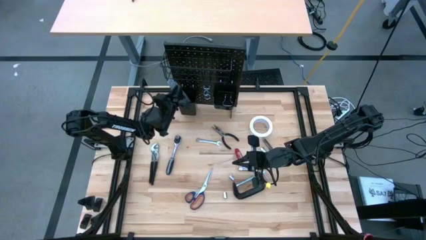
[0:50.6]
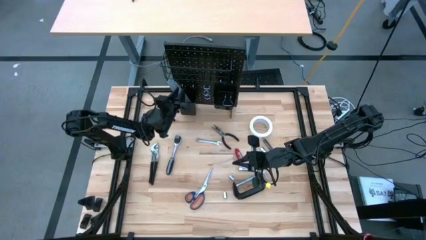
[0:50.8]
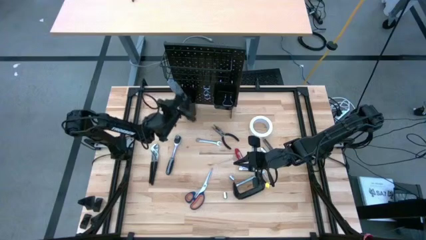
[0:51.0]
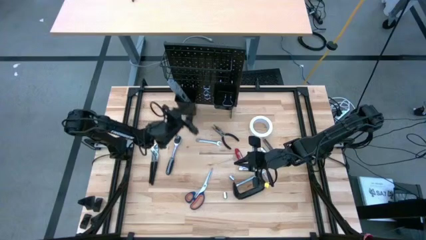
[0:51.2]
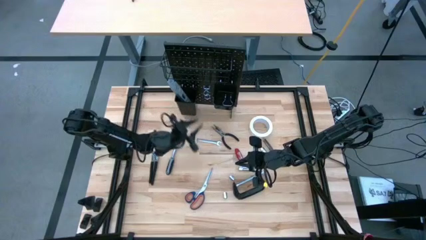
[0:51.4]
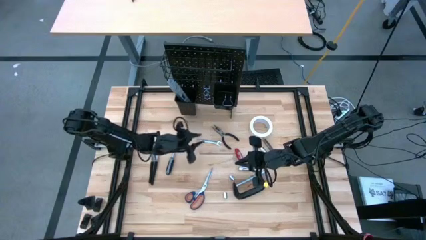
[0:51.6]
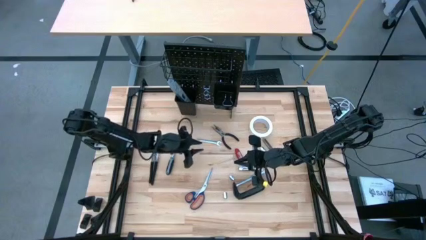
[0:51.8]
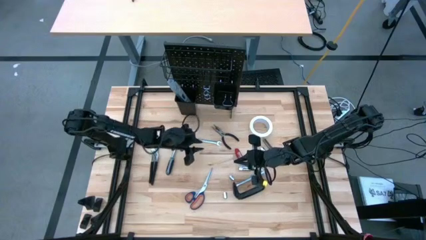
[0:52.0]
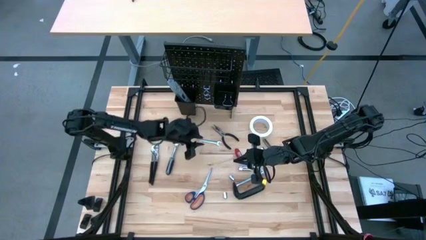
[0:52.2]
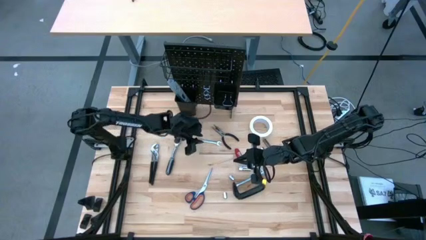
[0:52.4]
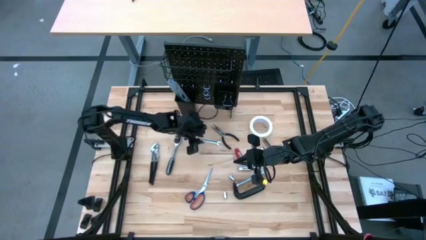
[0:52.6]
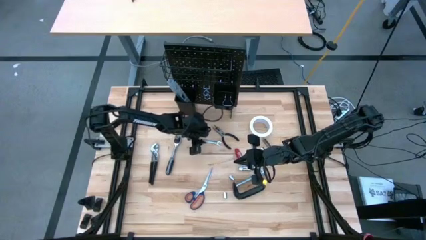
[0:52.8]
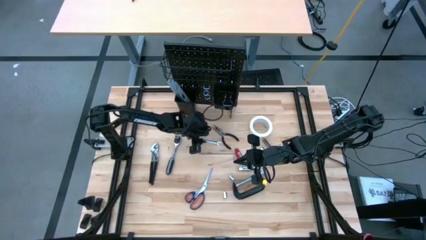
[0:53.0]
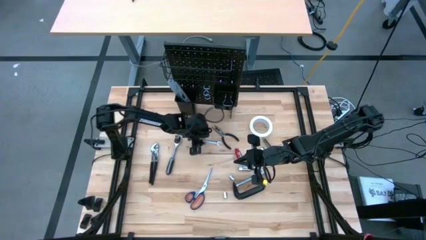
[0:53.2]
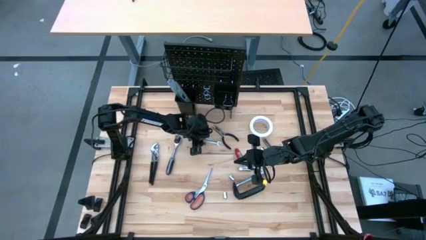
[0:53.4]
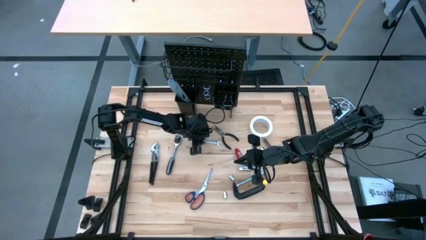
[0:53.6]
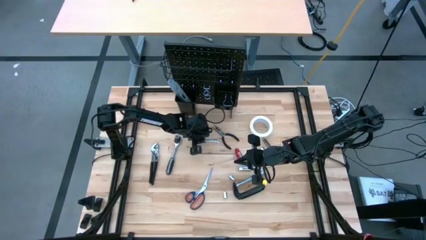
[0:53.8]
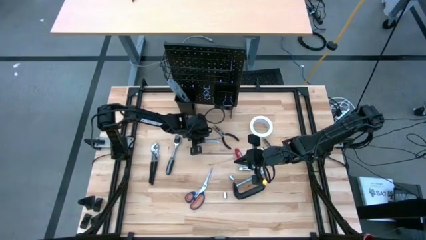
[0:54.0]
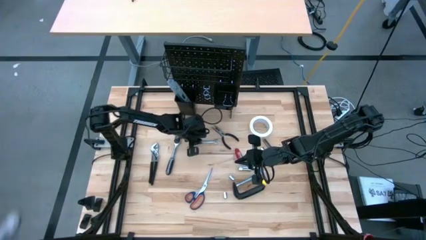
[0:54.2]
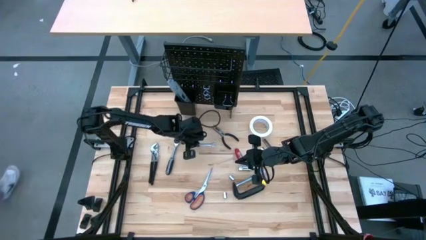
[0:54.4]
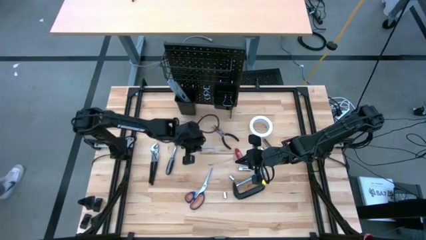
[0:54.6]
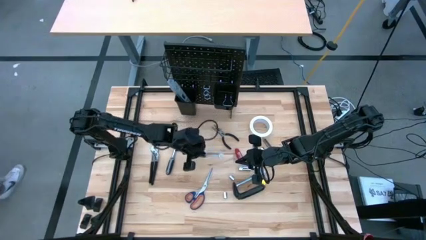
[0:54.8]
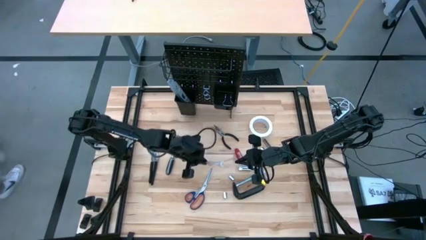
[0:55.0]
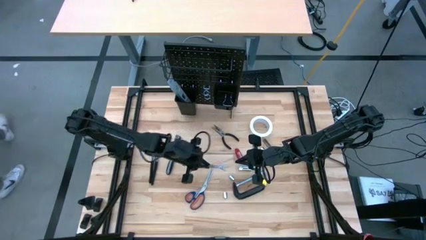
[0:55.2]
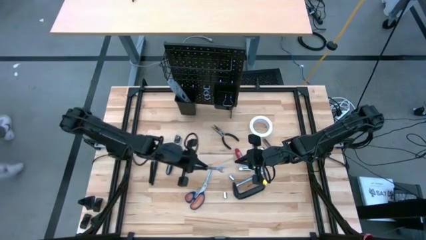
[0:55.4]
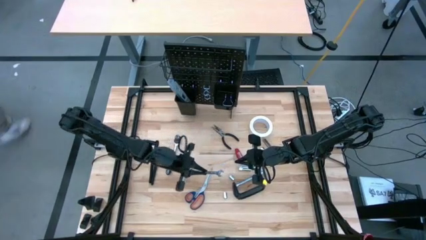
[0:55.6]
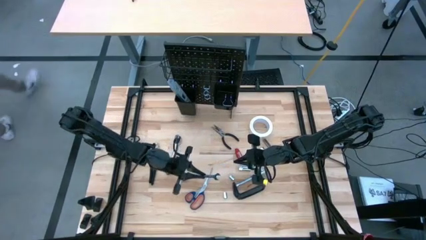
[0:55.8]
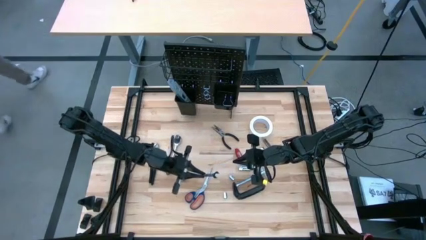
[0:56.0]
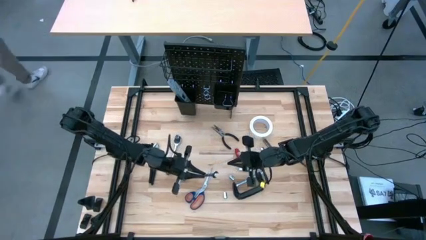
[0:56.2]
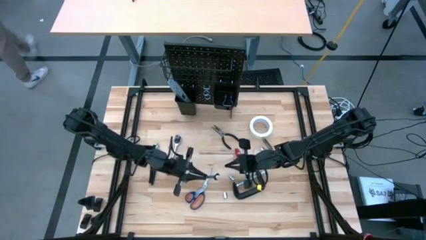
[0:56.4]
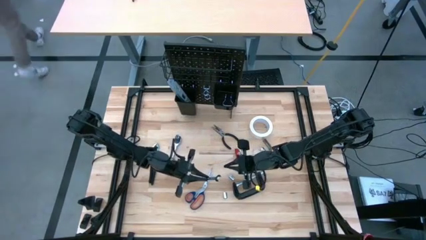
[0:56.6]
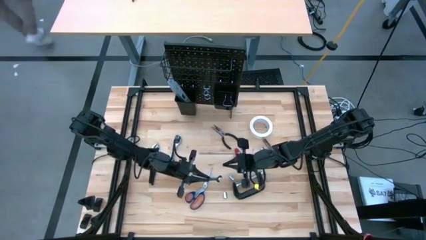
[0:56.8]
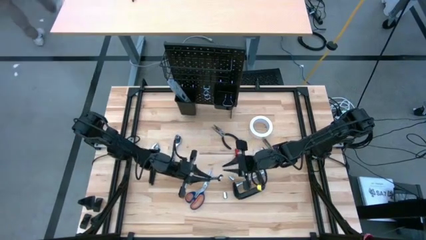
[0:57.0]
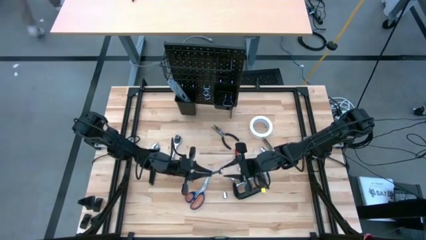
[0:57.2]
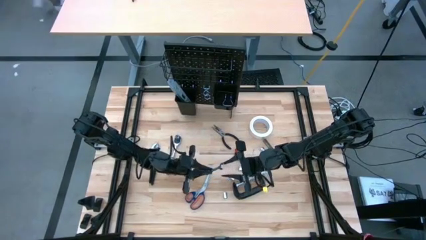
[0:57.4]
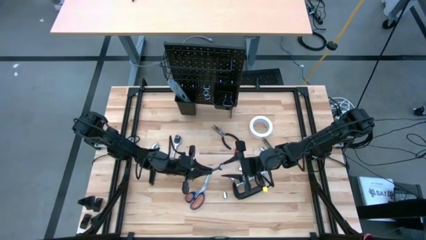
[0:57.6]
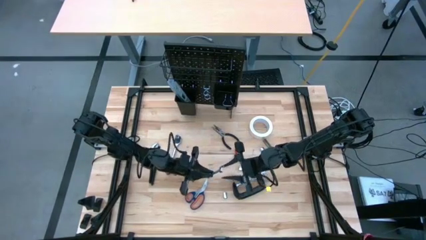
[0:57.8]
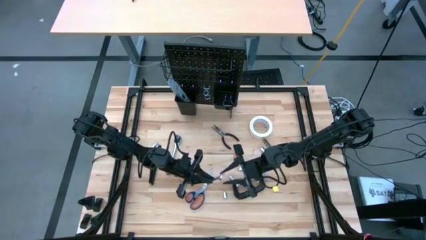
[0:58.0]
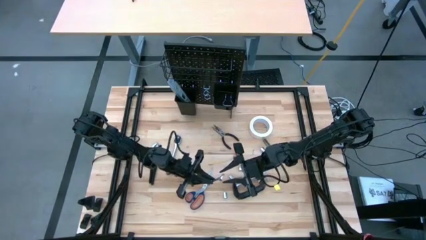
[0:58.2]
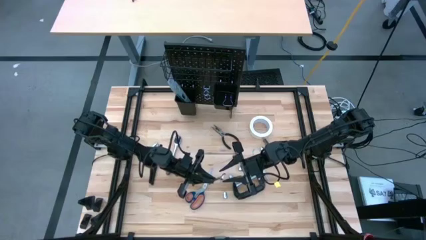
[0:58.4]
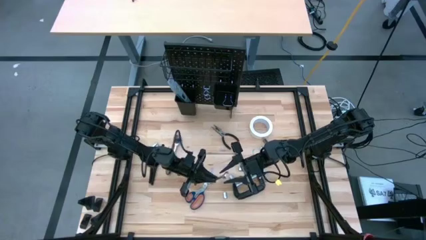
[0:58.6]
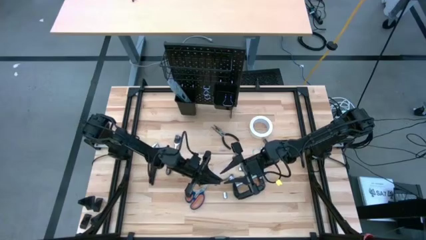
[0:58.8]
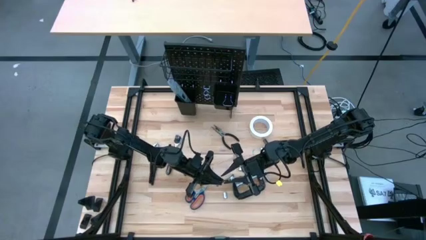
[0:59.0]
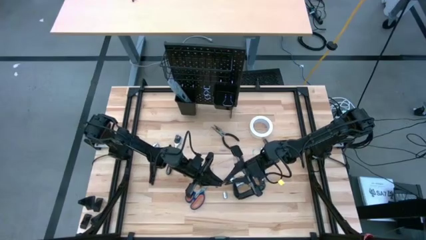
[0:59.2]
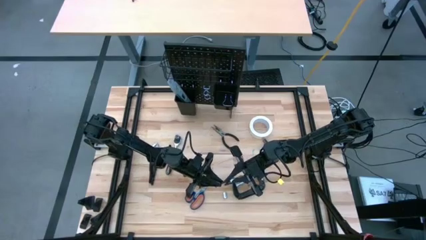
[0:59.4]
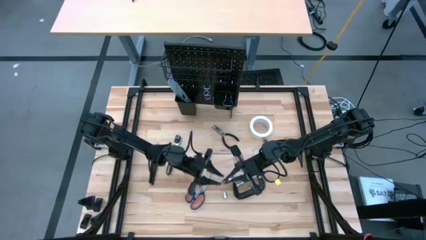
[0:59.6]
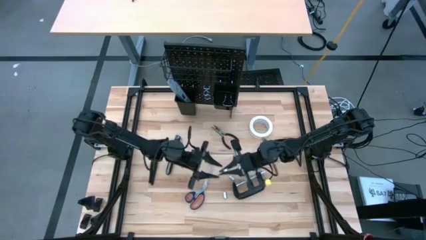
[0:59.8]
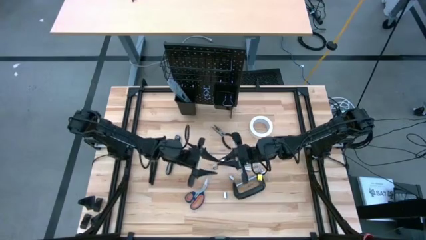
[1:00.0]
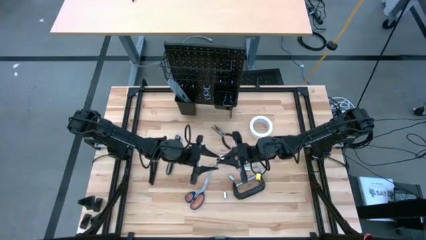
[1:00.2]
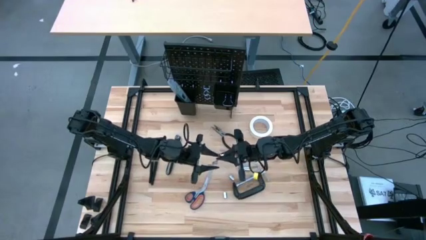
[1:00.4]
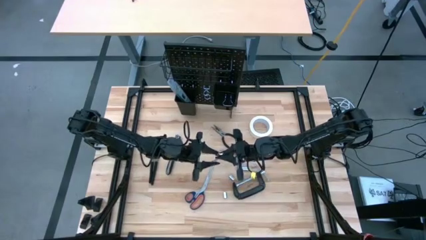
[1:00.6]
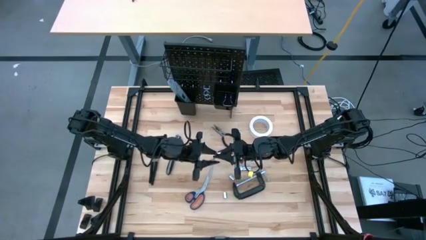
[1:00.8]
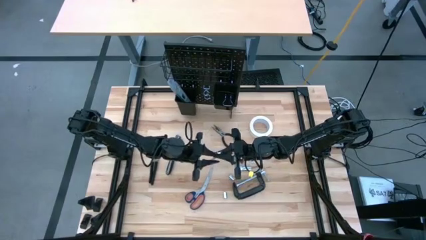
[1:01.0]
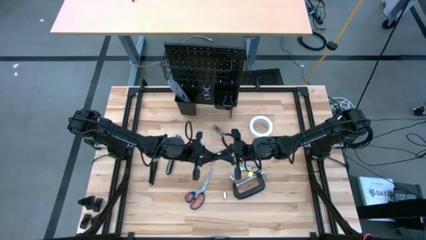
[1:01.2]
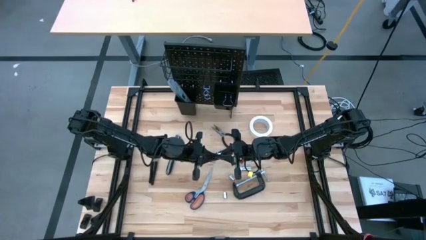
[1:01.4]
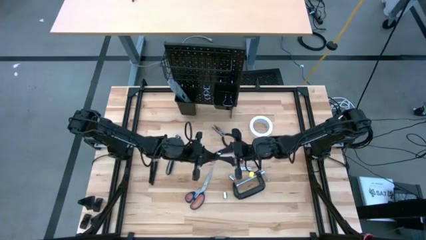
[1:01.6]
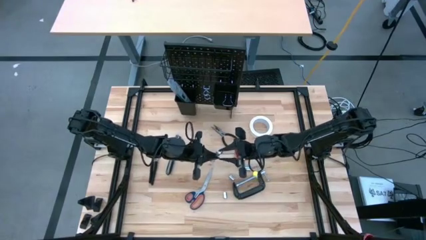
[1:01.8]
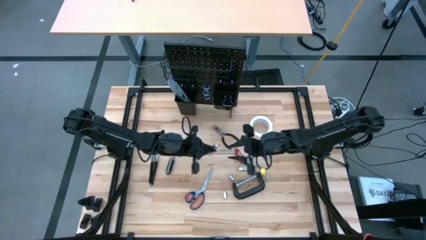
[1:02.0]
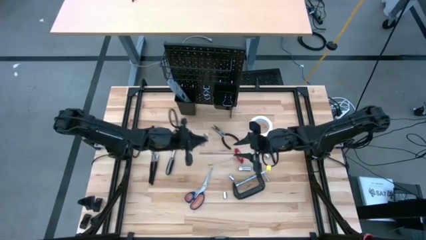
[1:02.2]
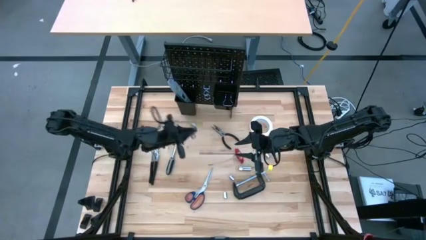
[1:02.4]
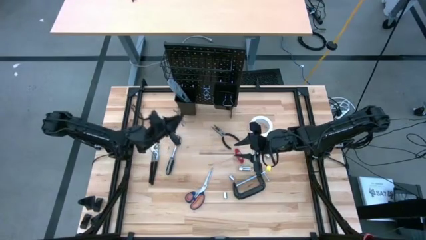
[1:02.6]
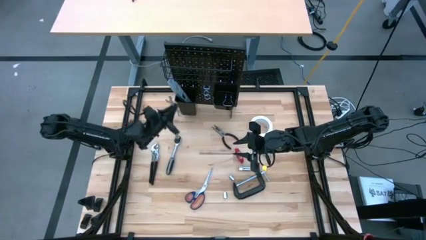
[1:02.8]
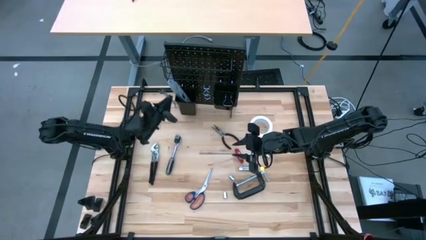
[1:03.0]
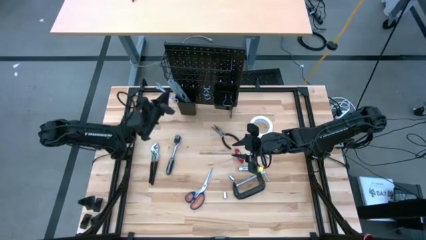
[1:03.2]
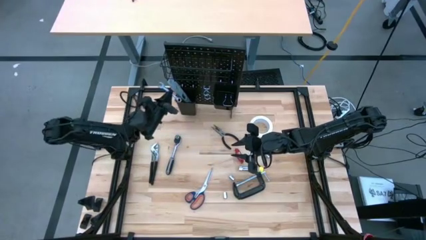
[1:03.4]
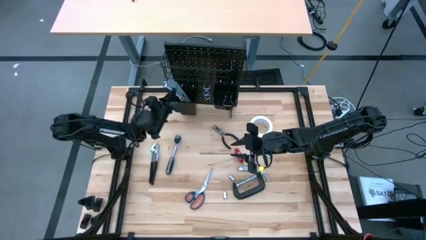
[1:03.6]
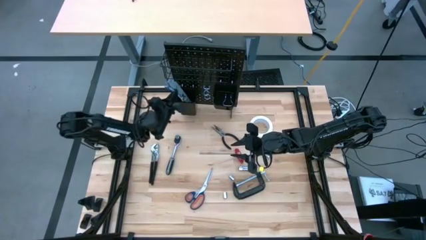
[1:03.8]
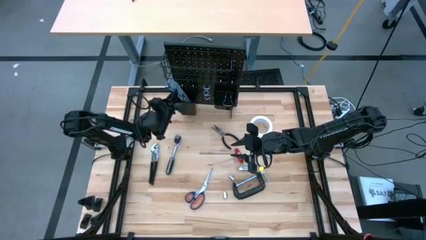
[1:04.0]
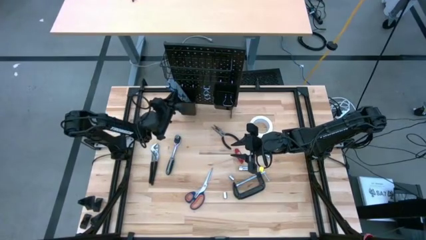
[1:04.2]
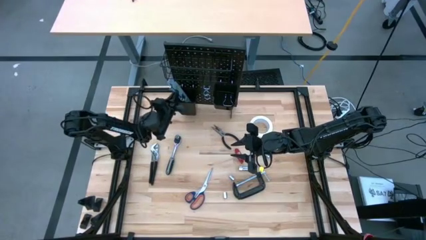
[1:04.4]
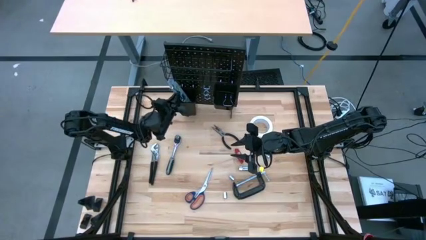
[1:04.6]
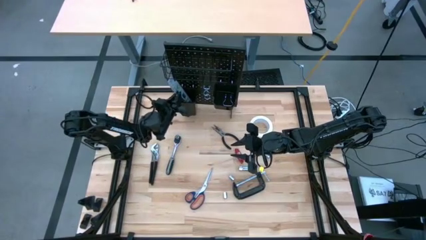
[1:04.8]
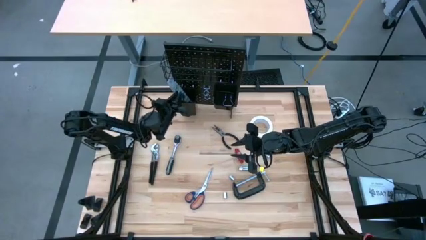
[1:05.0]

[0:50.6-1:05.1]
Task: Hang tools onto peg board
Put the wrench into the left black bin on the peg board
